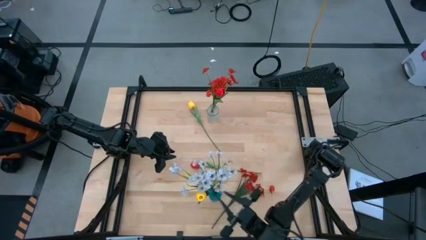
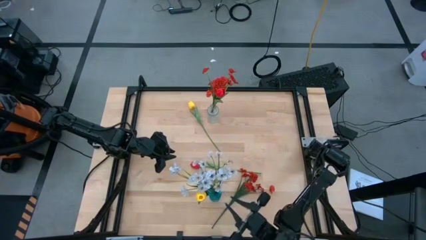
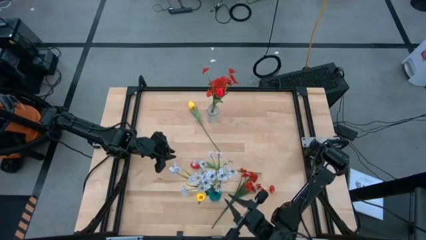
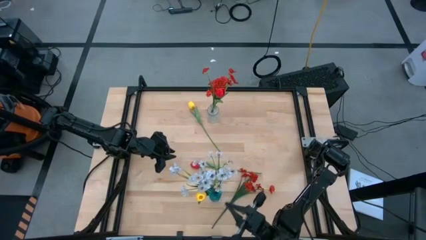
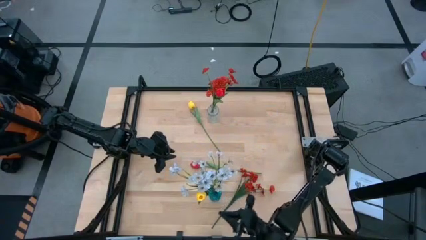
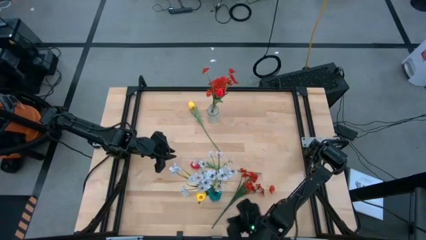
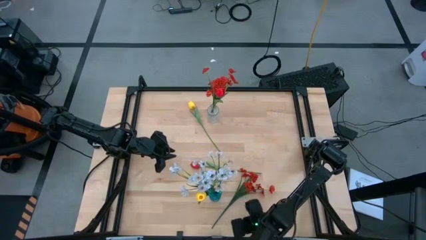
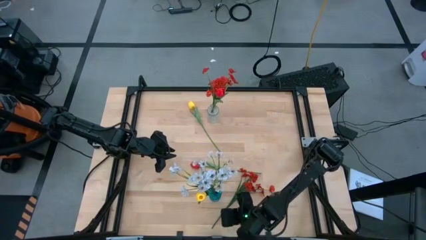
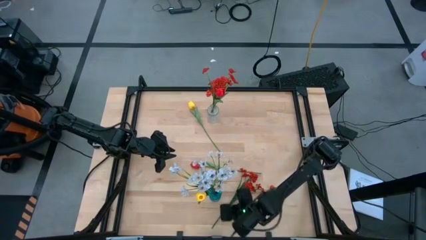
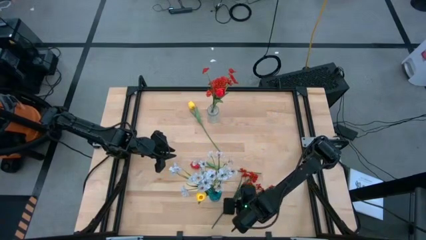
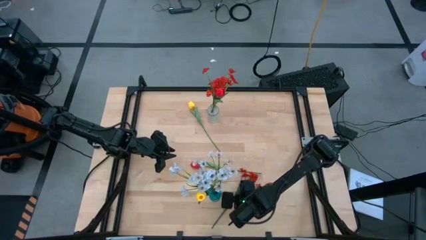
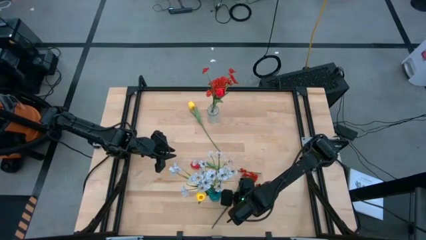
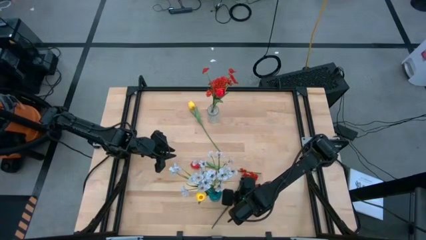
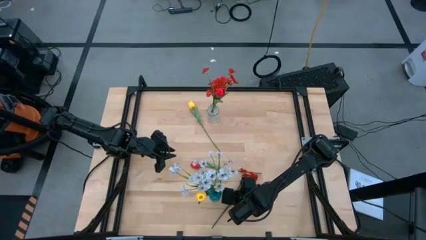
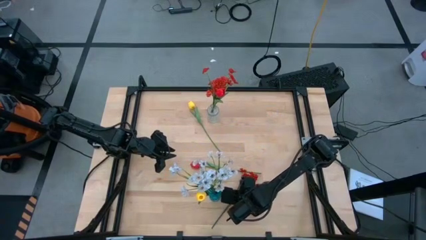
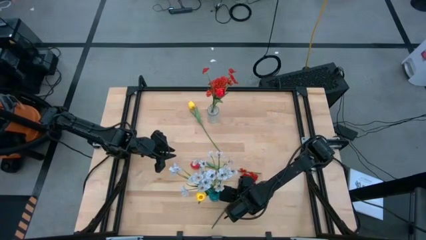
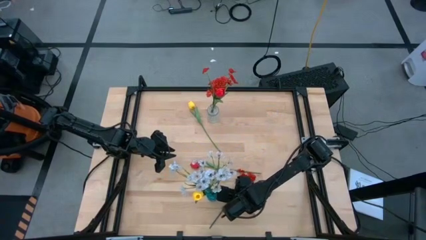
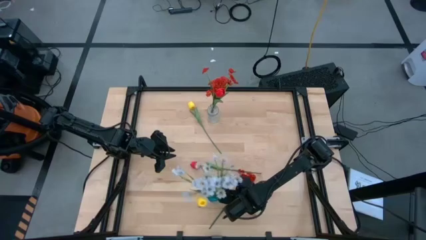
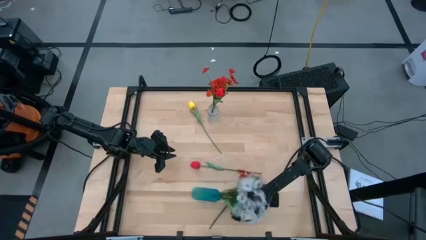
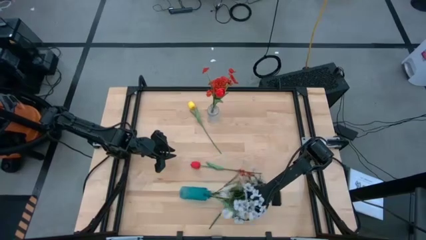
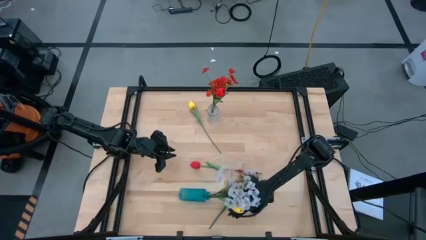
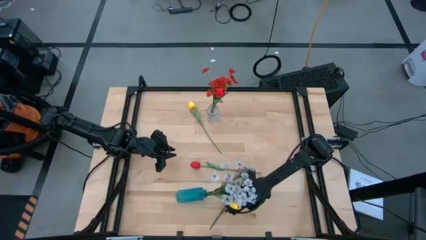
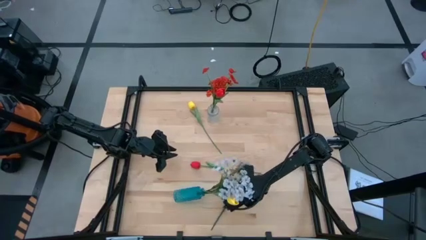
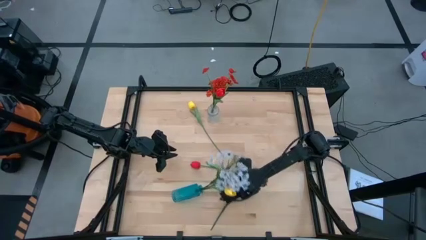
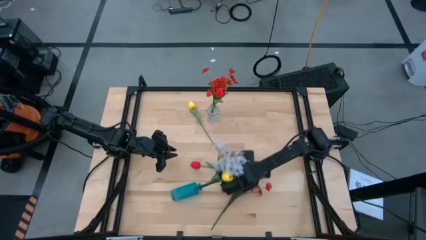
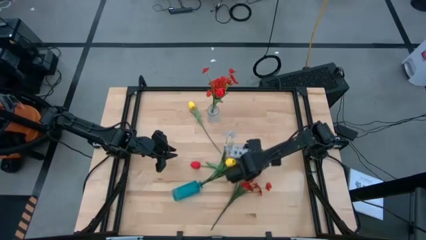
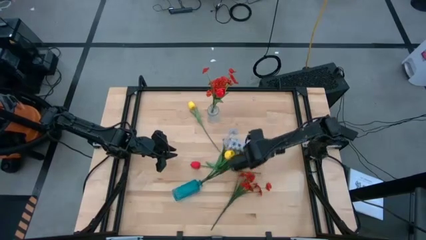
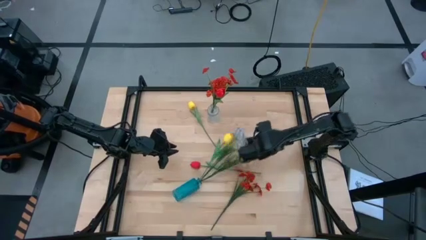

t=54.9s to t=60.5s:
Task: Sort flowers into vase by color
Put the orange flowers into the transparent vase

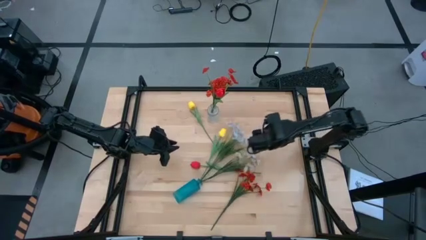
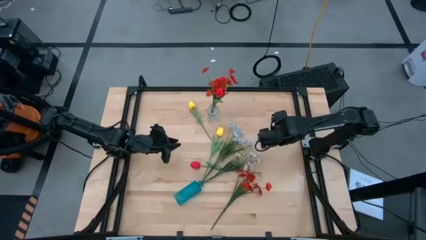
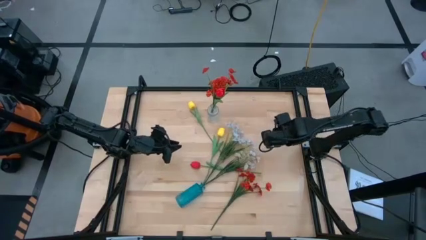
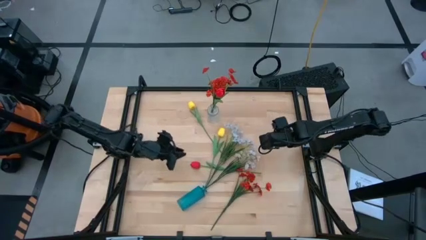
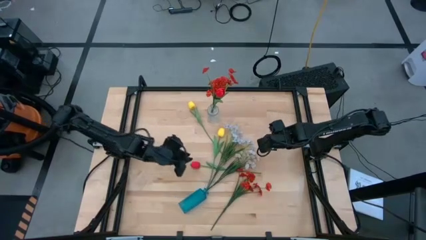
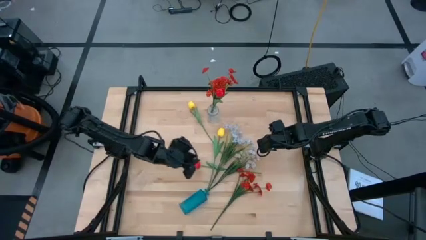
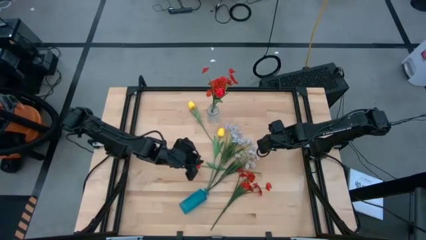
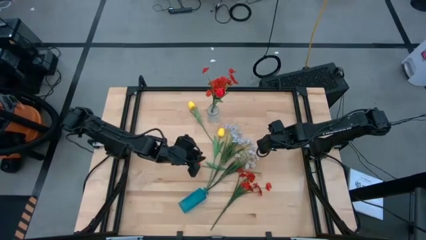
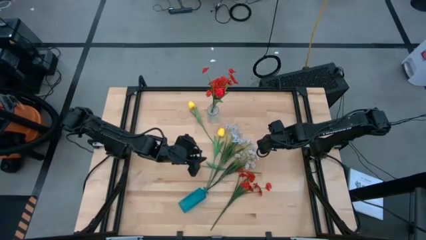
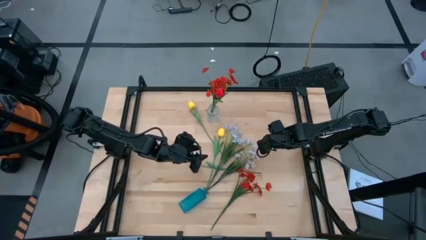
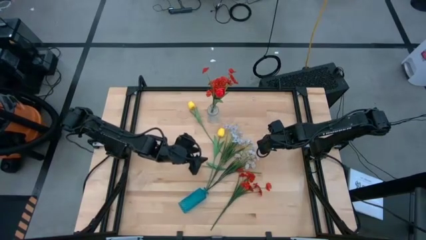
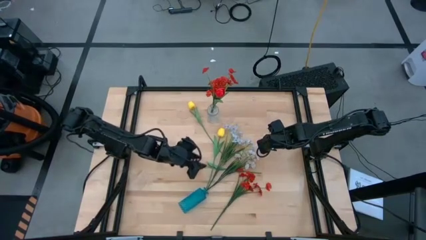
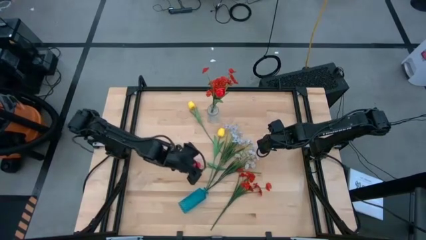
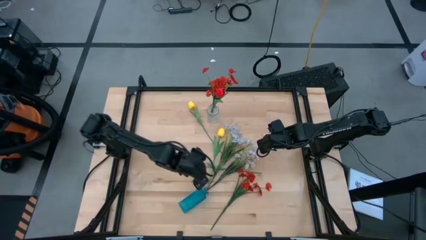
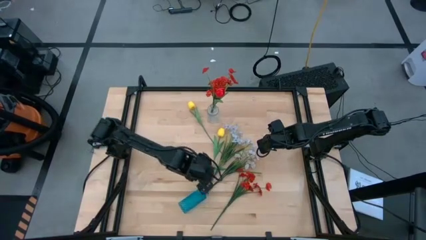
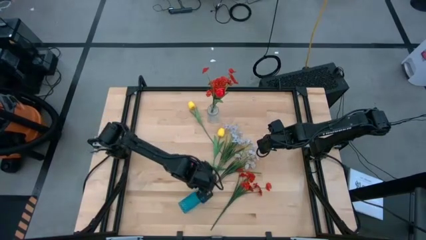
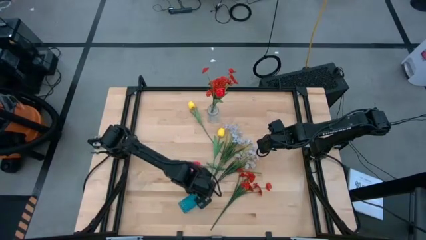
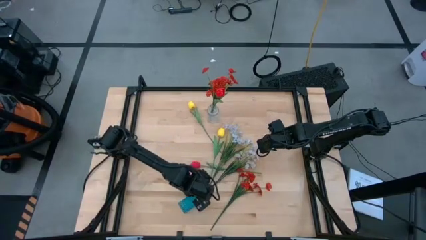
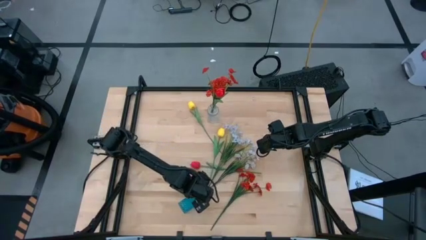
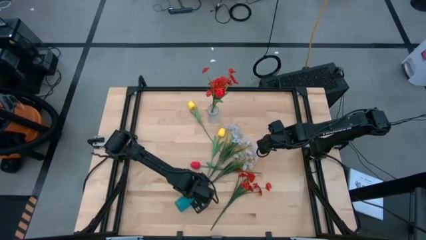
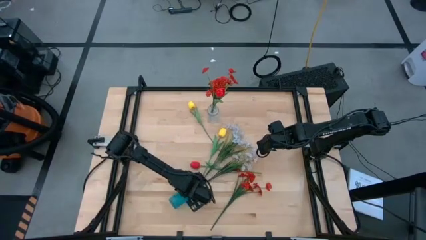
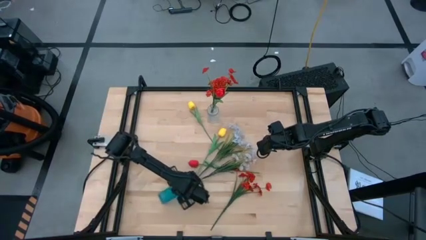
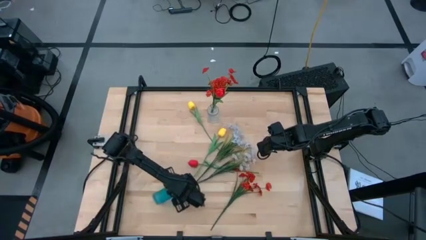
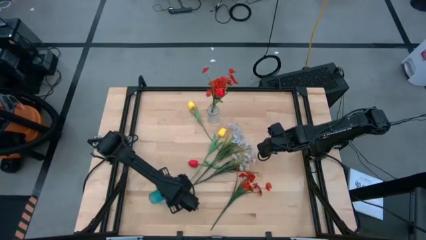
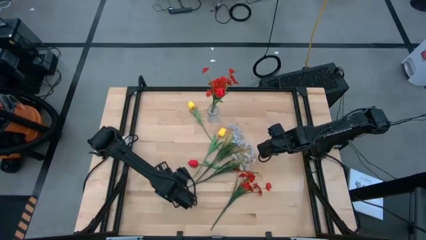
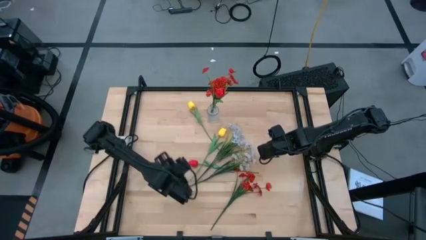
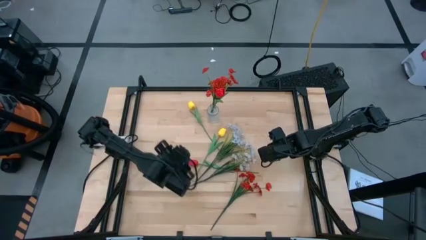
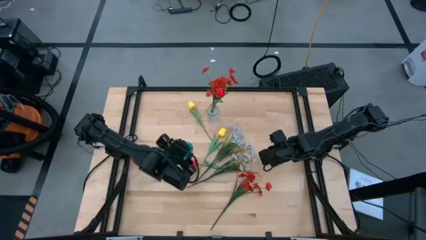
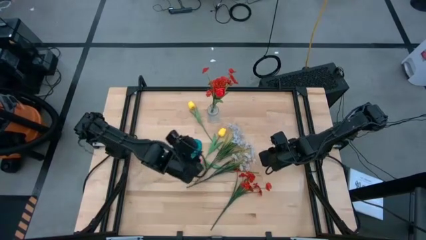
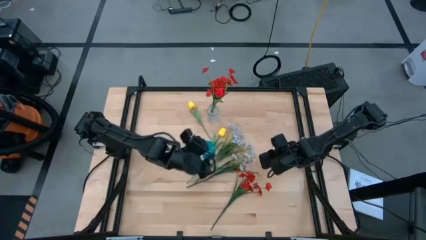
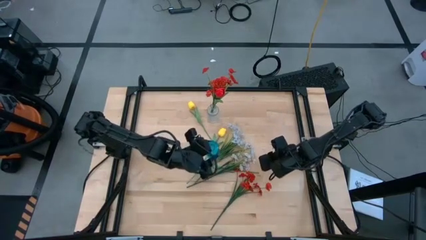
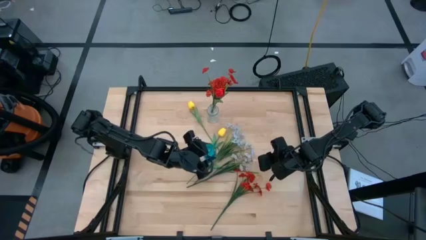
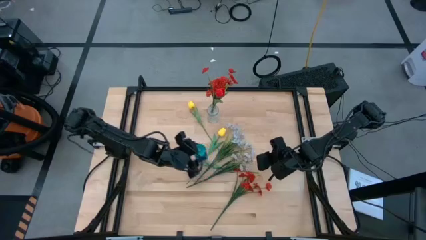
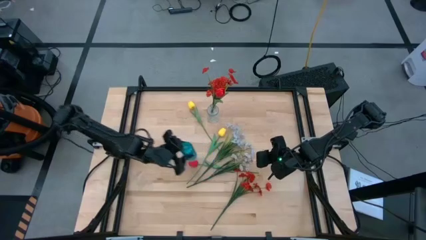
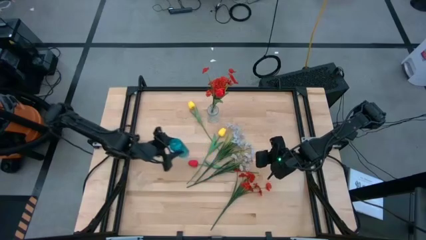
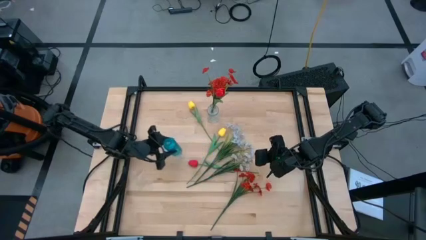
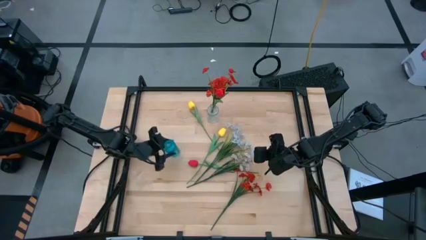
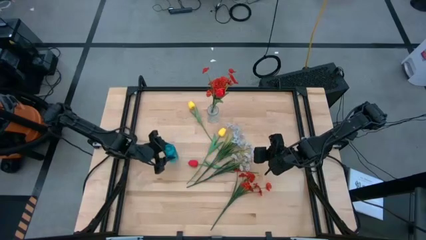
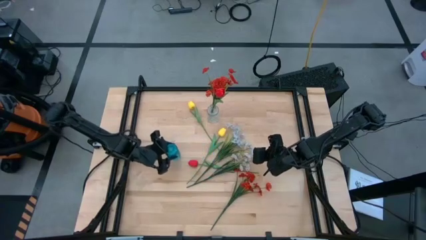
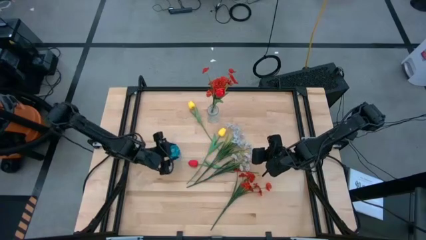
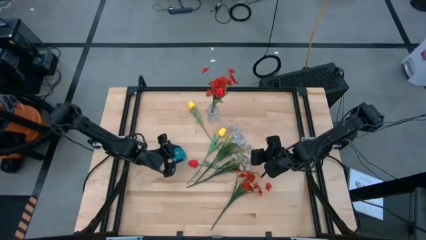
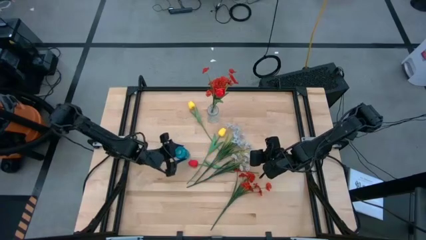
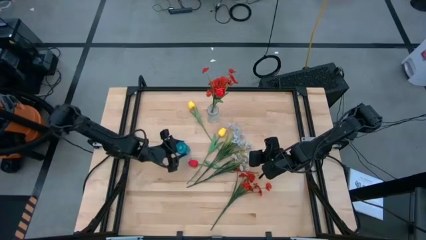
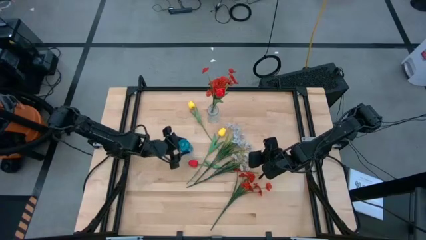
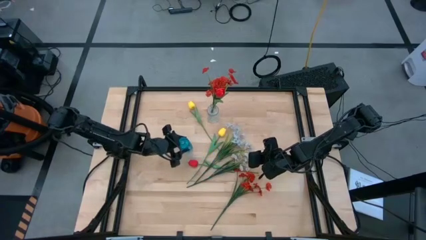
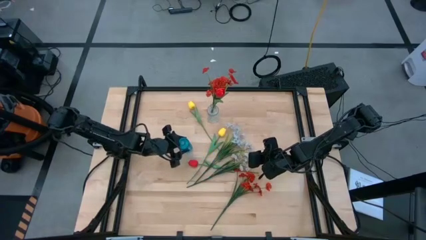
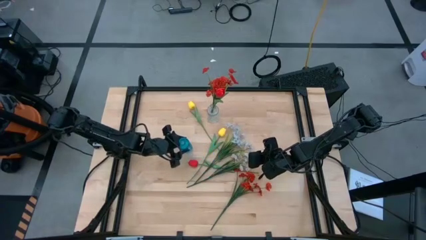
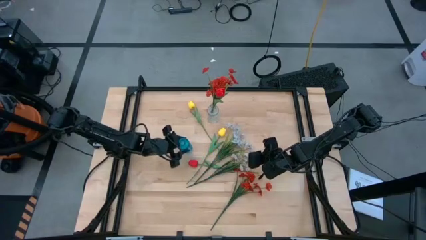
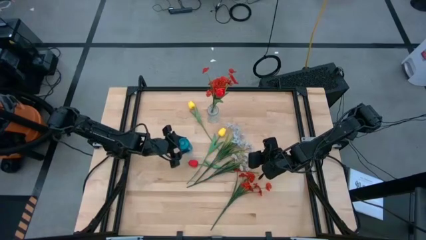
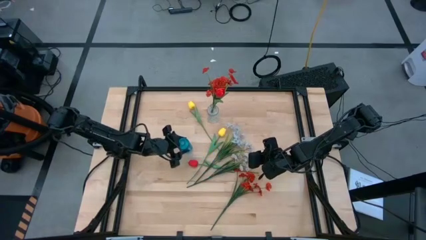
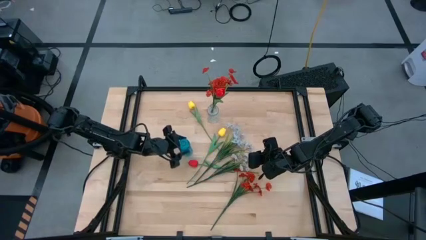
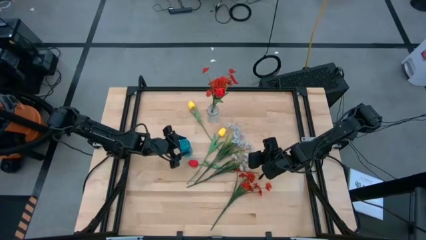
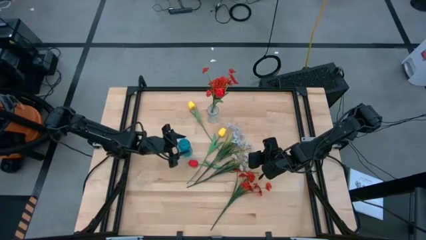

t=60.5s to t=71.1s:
Move the blue vase to the middle left of the table
